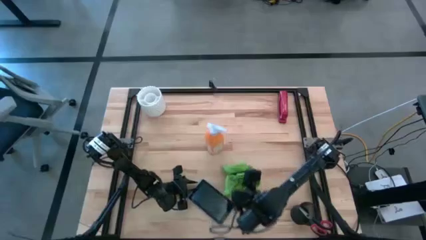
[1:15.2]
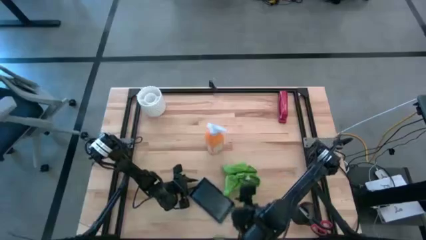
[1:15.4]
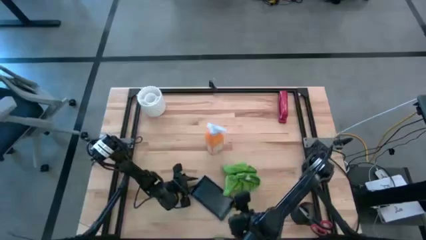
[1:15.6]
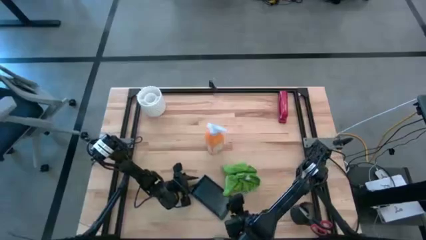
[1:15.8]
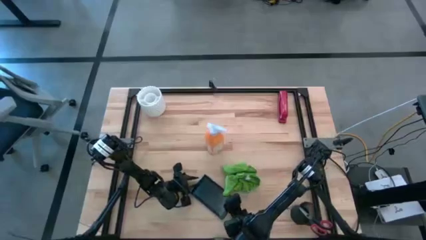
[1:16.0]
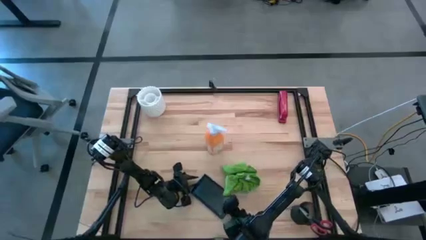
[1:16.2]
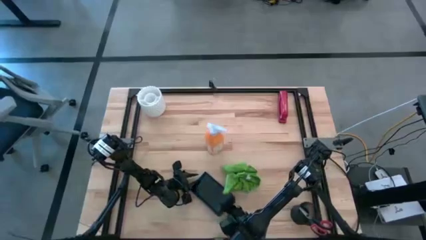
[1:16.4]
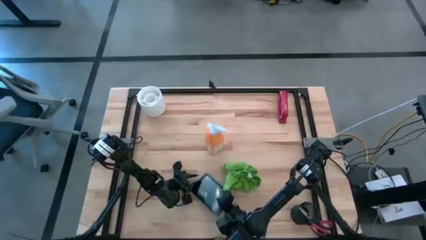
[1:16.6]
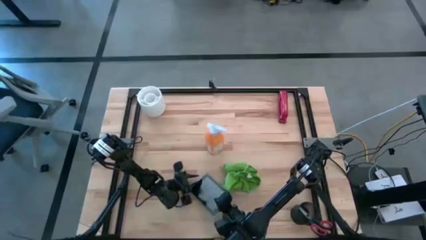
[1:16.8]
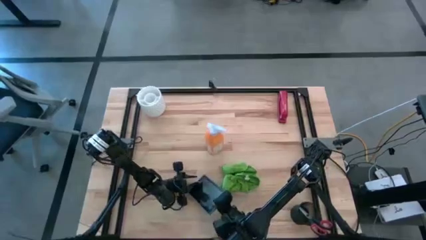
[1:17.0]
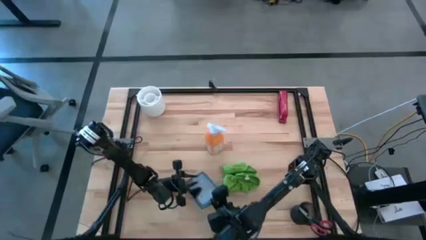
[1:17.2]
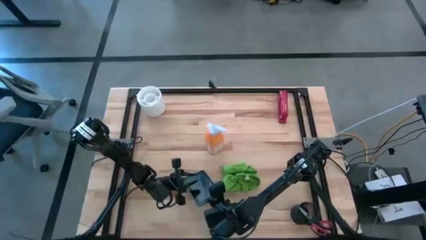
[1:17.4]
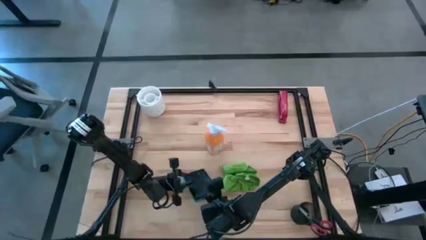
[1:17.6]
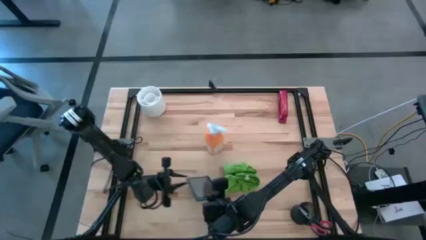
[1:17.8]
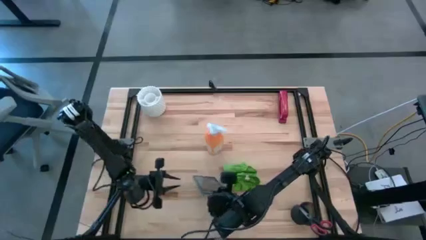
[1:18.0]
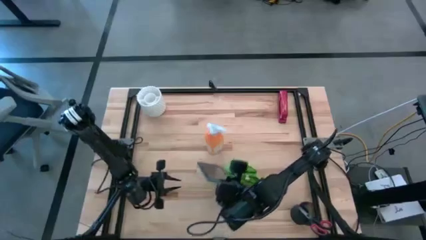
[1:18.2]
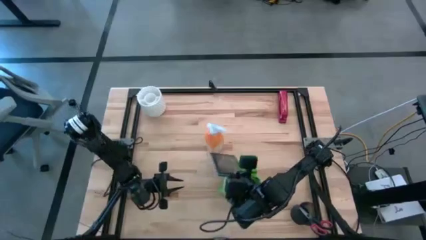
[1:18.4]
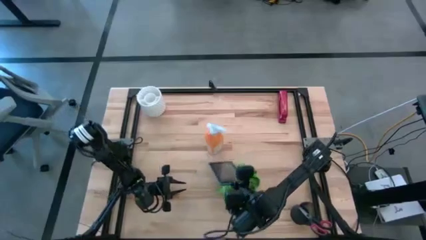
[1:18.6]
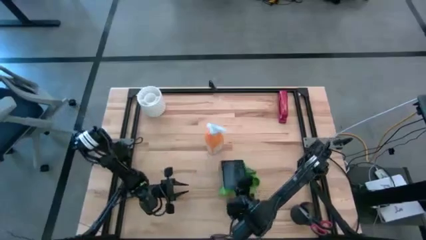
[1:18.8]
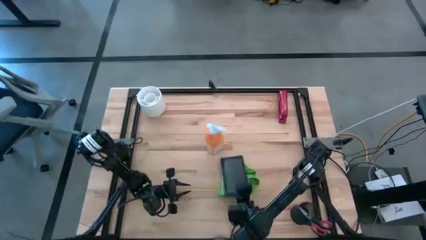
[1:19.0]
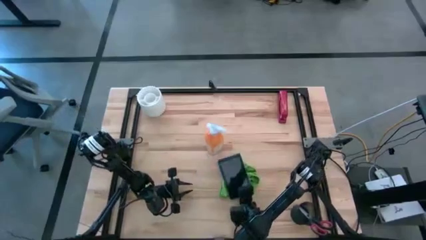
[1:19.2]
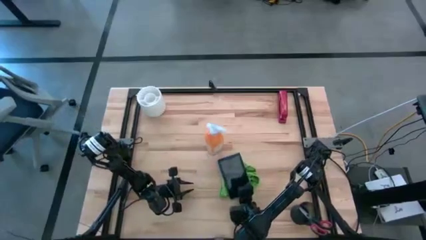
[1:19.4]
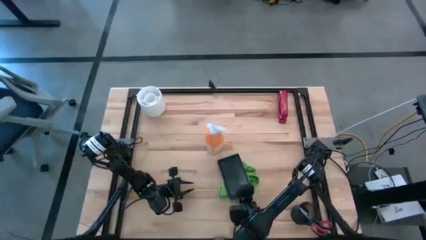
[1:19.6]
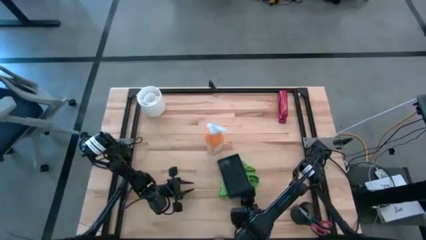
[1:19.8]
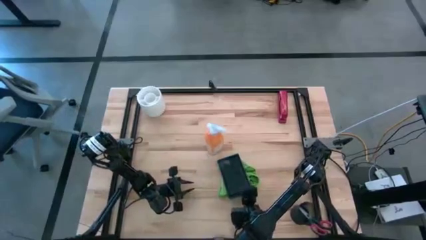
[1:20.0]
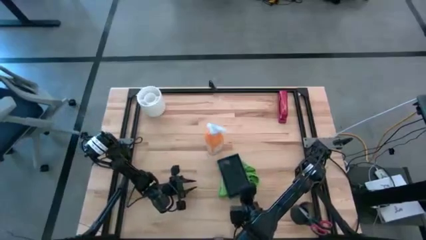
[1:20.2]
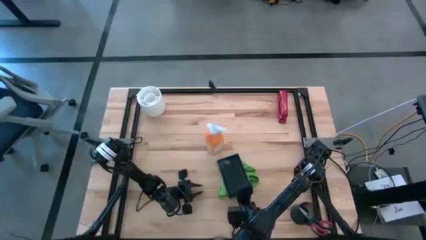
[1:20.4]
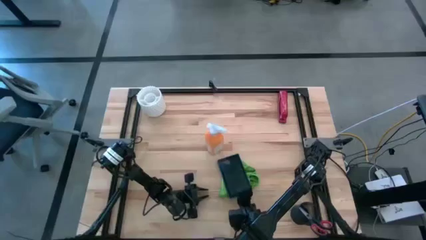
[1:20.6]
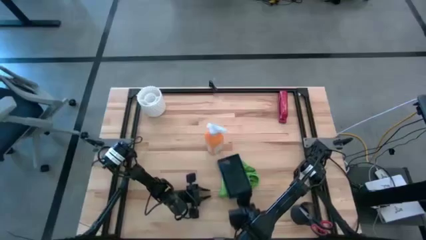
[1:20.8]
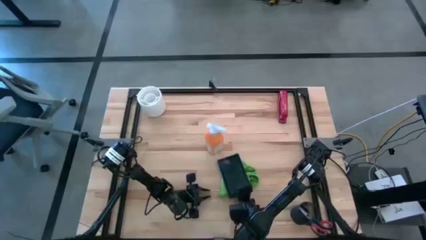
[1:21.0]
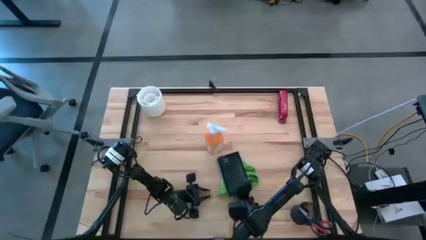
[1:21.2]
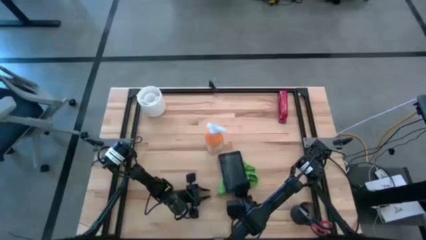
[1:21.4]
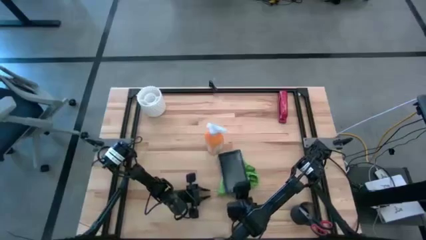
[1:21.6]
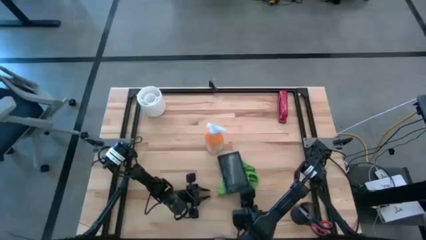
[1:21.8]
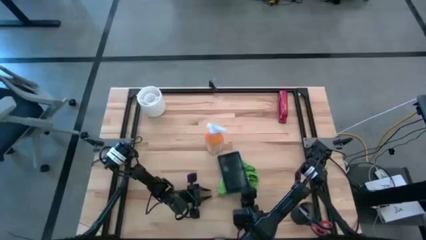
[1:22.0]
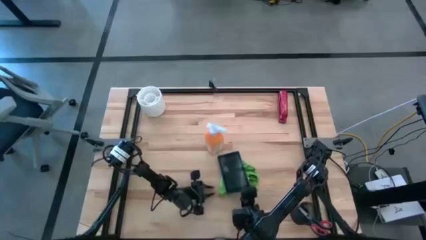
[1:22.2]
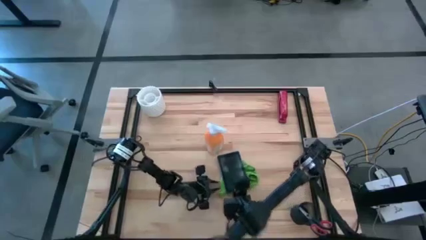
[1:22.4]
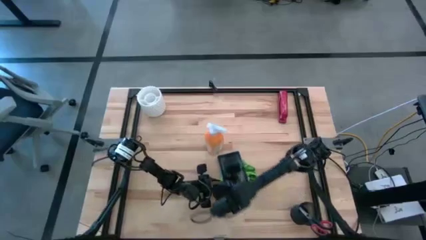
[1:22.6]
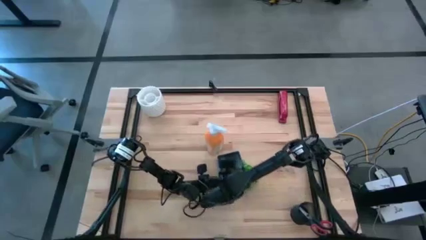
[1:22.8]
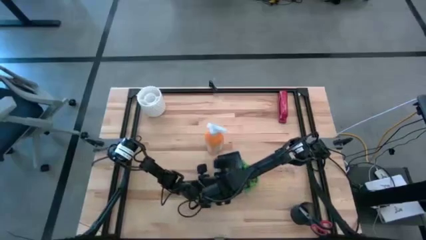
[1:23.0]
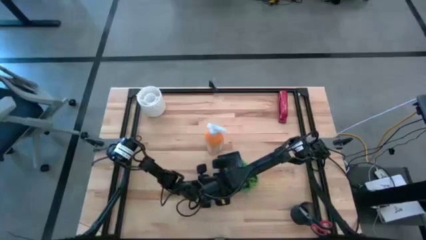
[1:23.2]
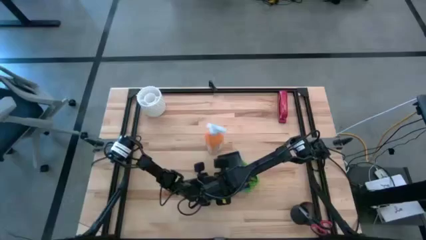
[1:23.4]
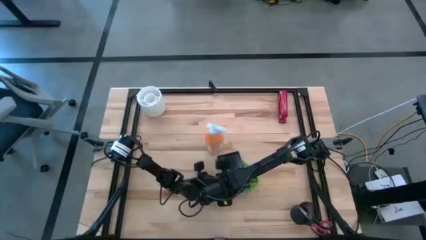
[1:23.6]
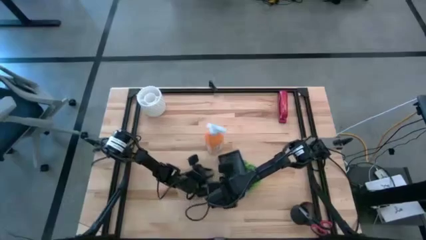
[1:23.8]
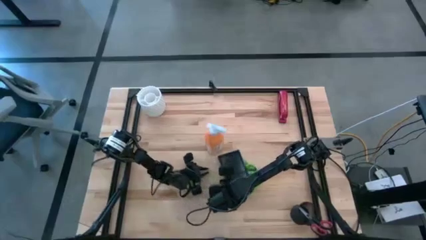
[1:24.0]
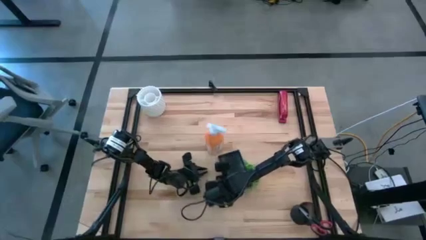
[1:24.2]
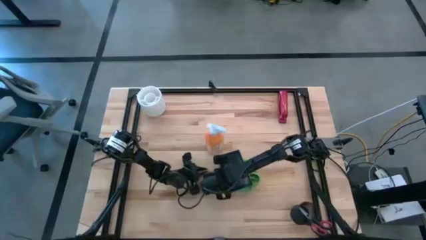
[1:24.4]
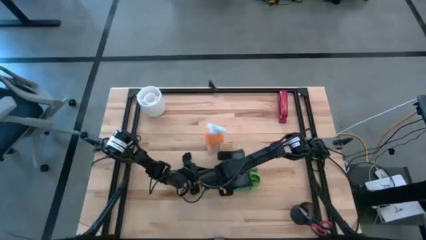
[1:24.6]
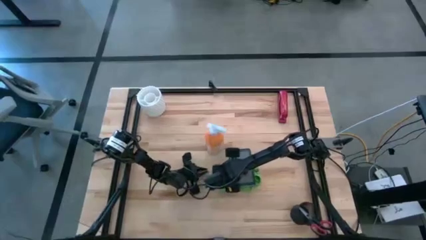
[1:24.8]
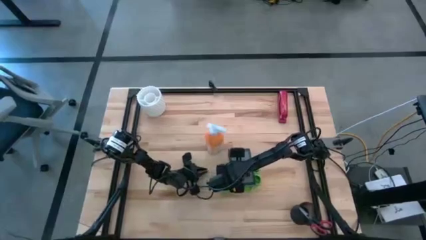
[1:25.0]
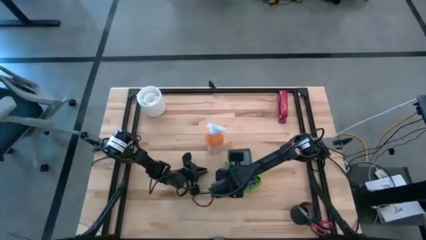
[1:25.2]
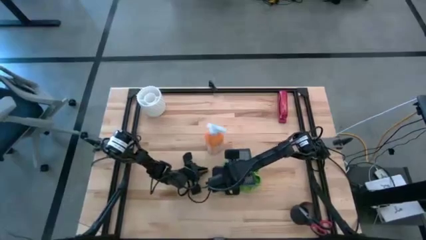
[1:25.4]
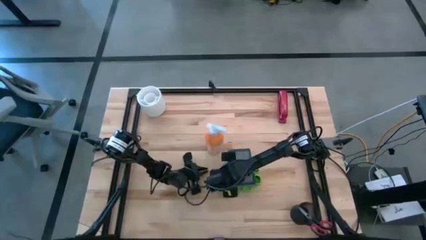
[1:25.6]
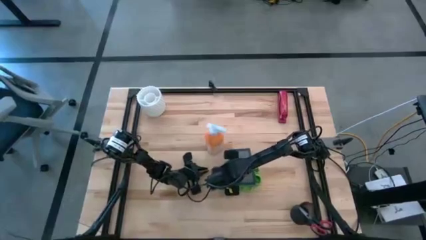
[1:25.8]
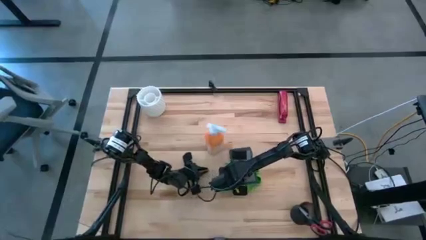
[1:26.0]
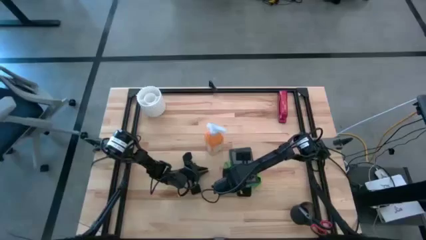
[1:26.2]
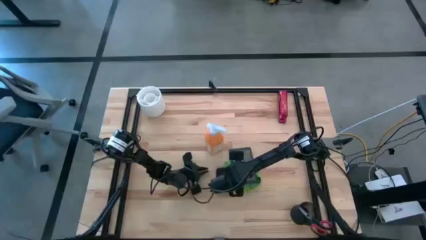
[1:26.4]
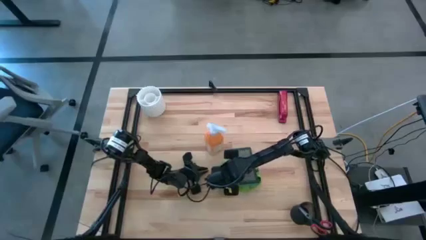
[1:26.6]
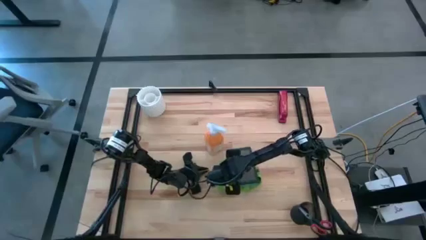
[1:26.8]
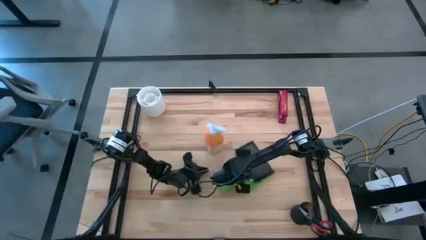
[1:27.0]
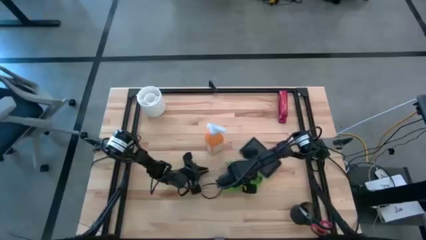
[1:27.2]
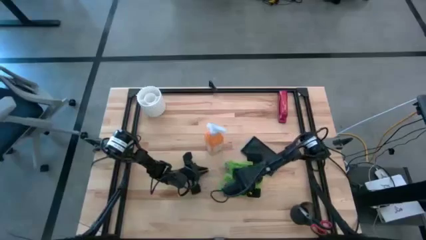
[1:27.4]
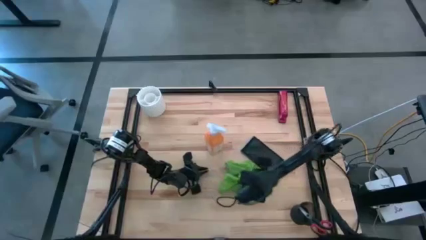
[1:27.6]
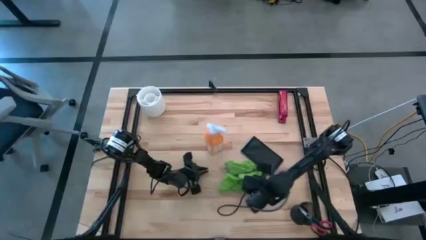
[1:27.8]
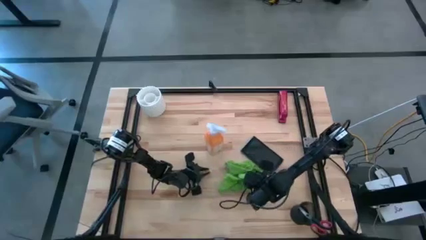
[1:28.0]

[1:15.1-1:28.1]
Task: Apply microfiber cloth
Wipe the blue tablet with the green microfiber cloth
